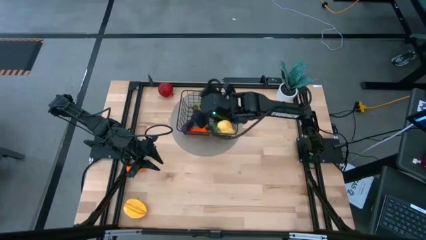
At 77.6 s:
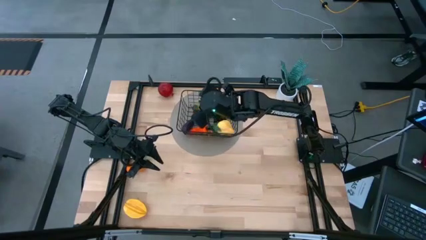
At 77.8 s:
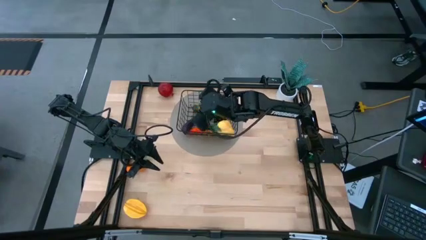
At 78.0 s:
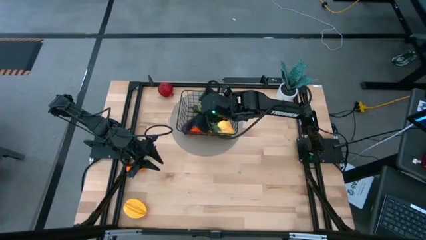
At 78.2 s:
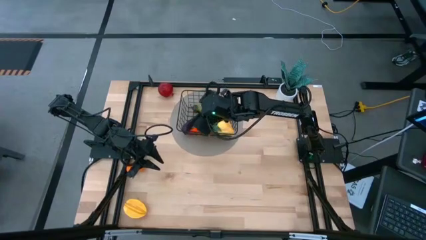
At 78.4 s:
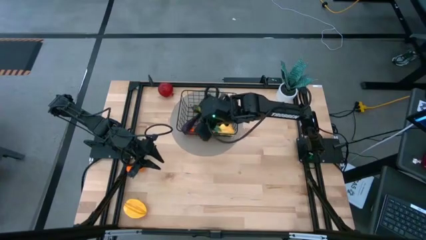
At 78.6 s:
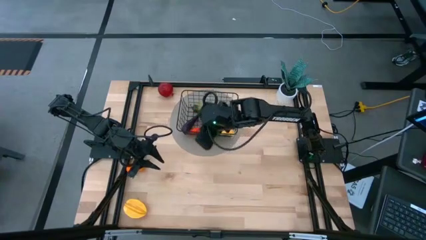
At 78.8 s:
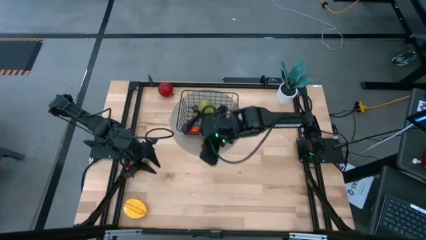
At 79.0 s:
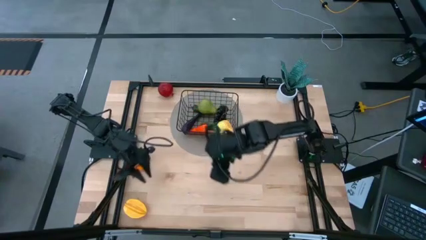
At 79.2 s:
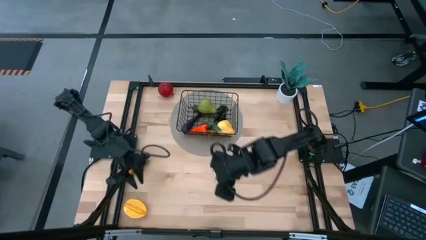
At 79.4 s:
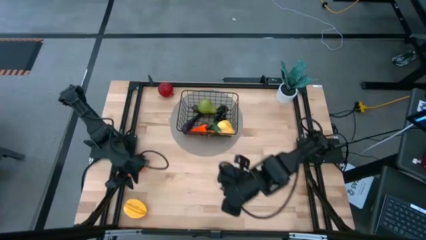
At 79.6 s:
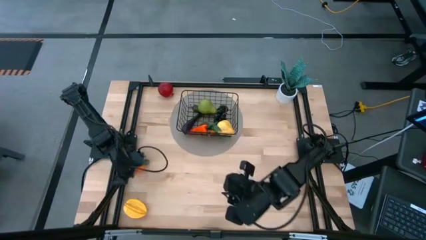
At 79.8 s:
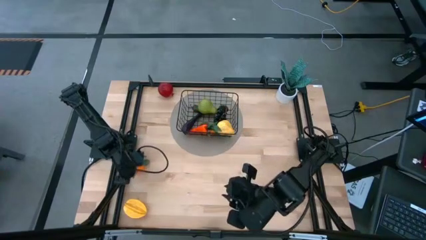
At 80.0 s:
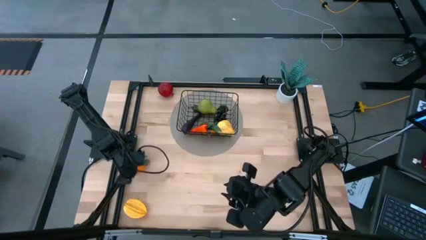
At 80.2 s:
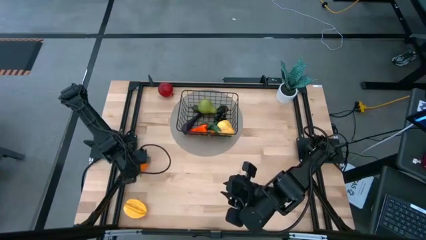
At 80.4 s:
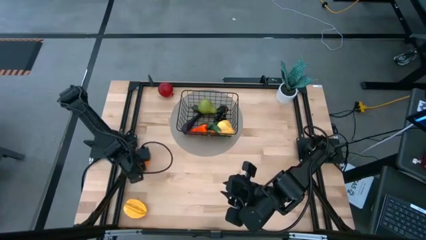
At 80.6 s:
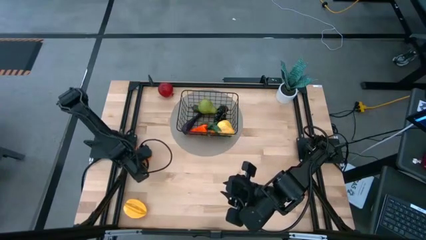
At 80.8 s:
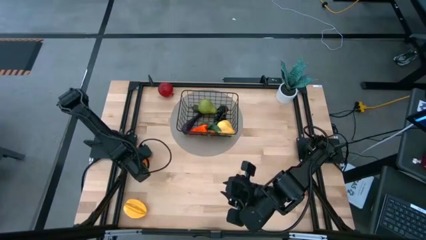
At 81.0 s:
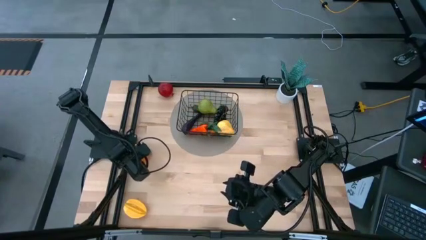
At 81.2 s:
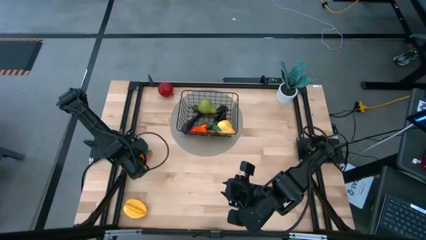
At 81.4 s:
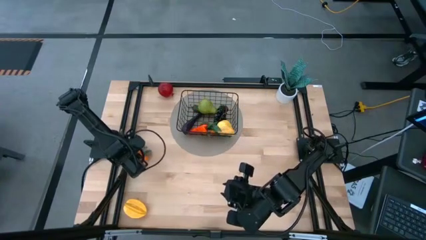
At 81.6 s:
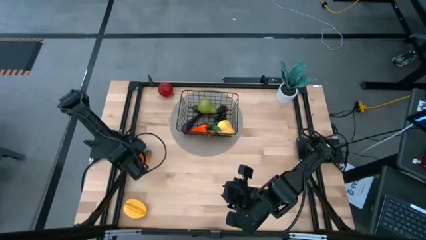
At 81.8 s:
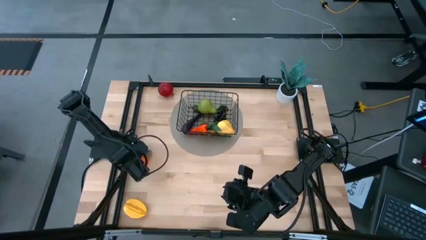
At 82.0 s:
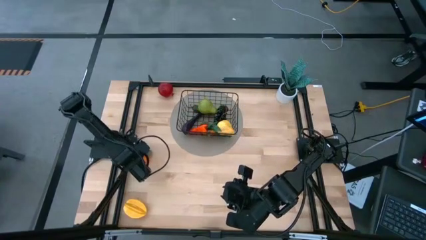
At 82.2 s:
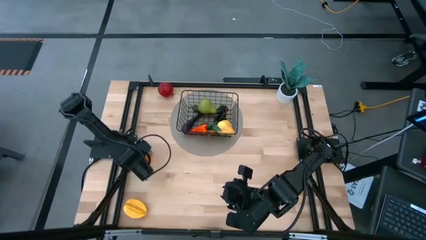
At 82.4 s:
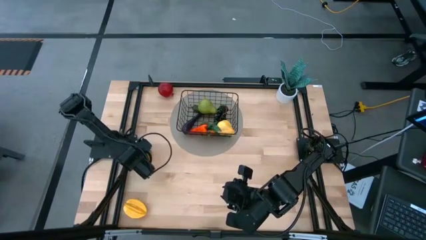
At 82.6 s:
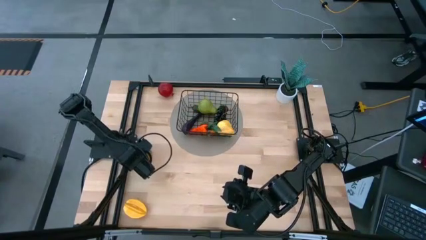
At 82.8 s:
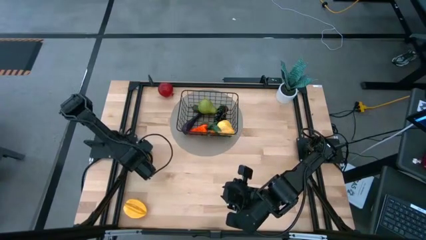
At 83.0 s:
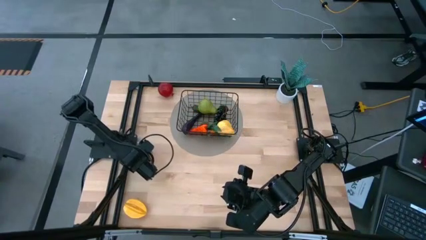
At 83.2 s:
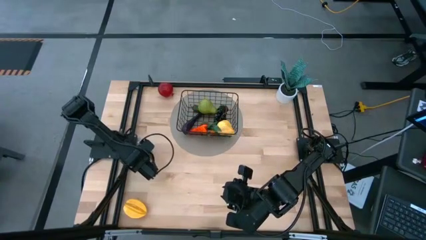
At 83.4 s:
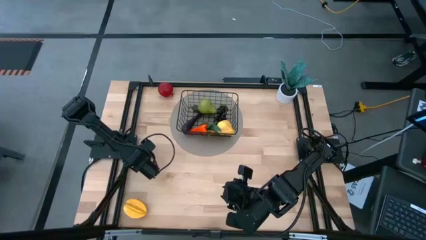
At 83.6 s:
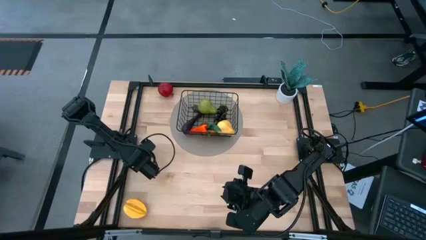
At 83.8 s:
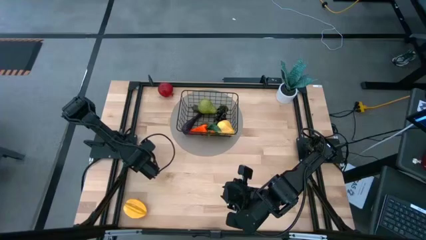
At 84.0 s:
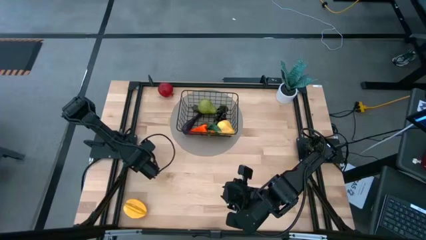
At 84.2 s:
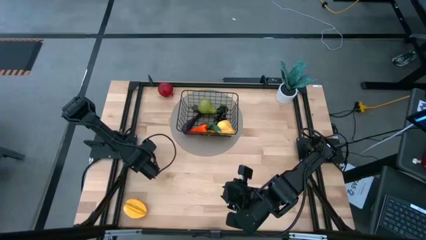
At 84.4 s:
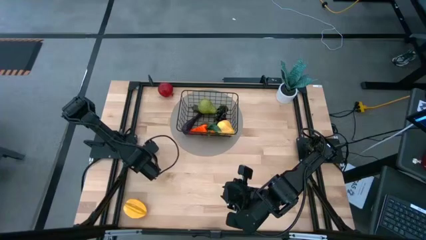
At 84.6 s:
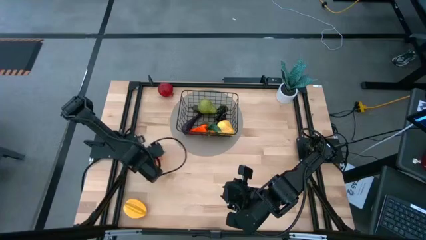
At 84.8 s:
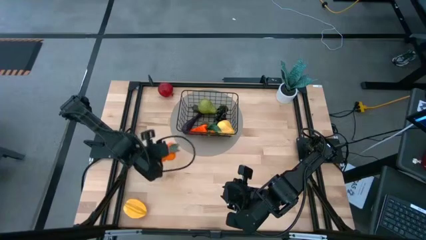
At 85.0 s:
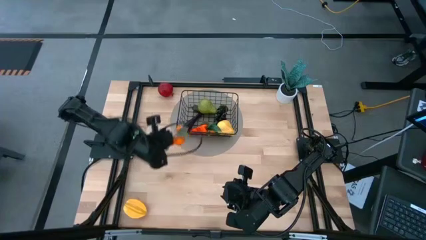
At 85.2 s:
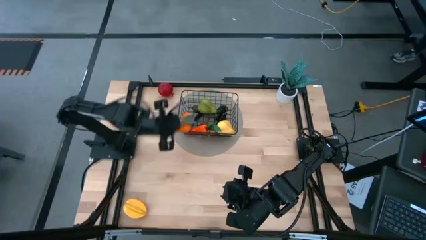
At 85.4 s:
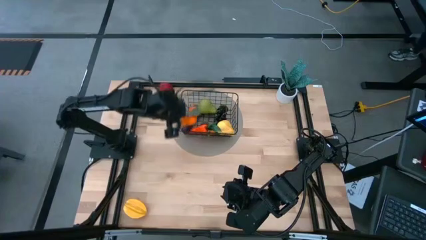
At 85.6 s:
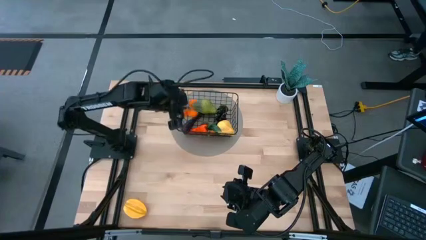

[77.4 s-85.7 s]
Task: Build produce basket
Put the orange tangerines into the black wire basket

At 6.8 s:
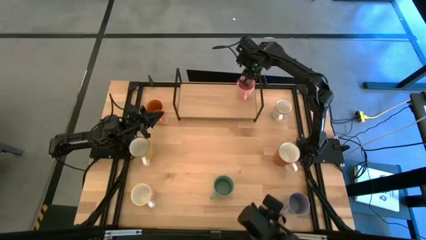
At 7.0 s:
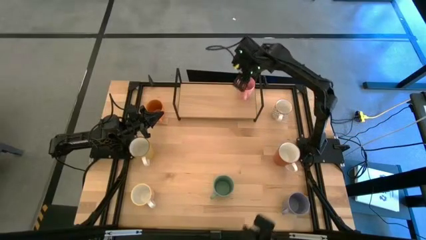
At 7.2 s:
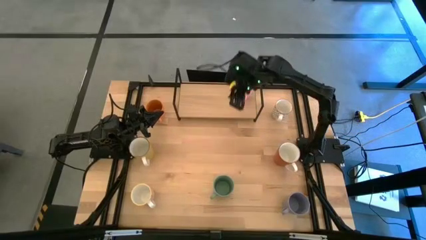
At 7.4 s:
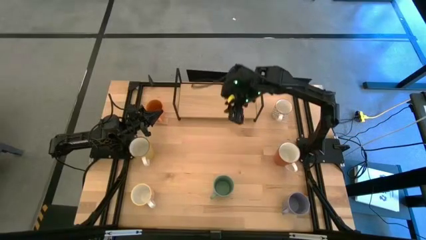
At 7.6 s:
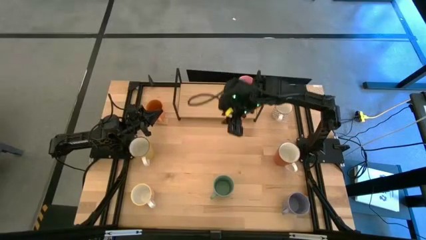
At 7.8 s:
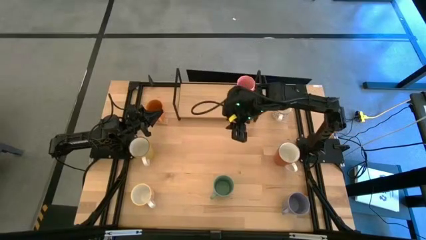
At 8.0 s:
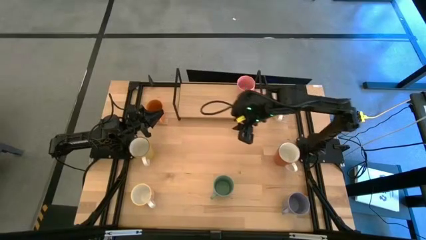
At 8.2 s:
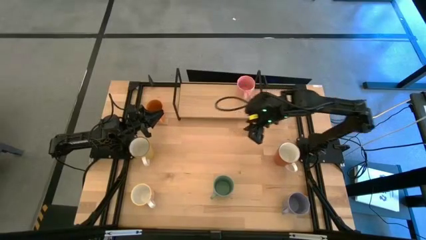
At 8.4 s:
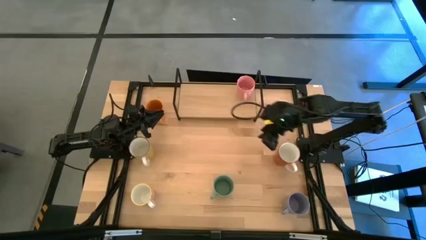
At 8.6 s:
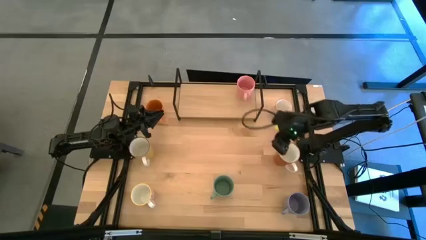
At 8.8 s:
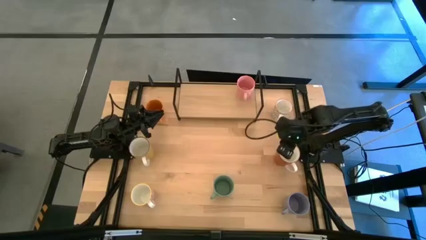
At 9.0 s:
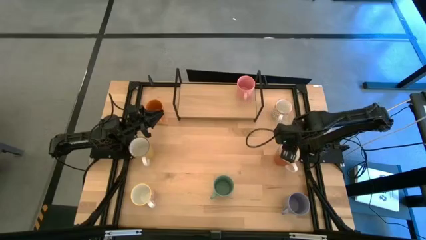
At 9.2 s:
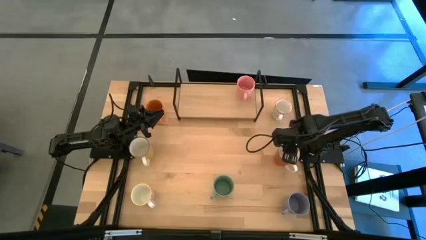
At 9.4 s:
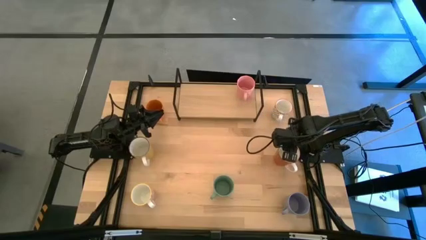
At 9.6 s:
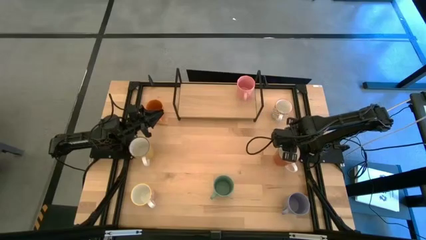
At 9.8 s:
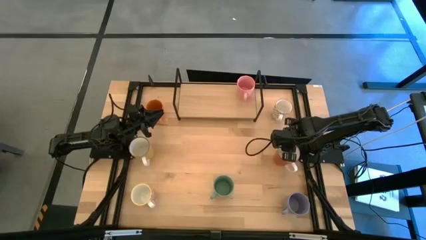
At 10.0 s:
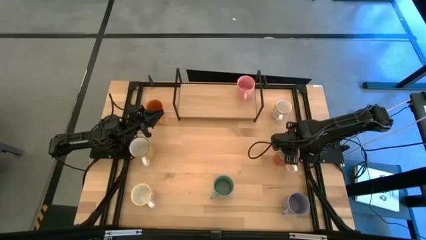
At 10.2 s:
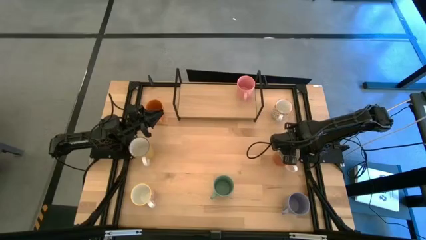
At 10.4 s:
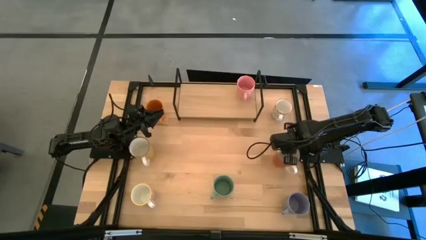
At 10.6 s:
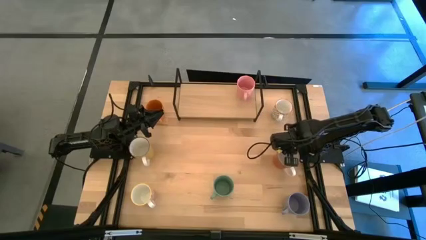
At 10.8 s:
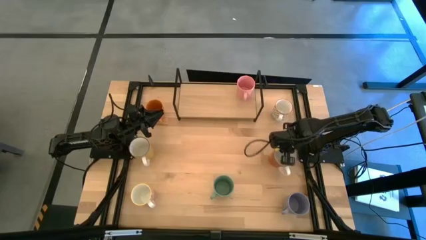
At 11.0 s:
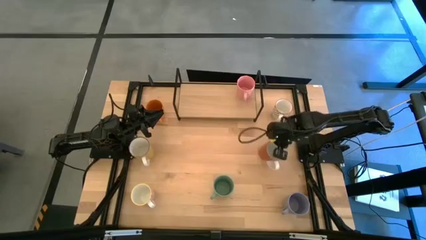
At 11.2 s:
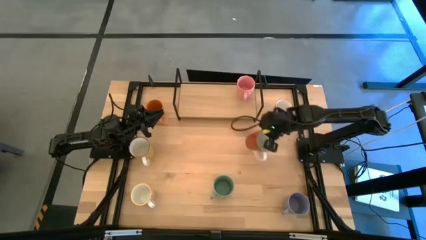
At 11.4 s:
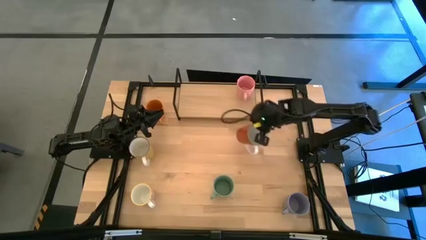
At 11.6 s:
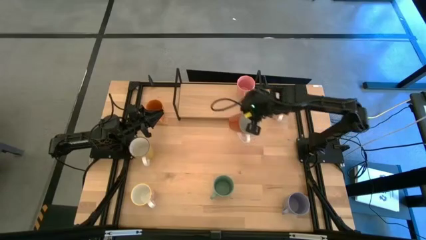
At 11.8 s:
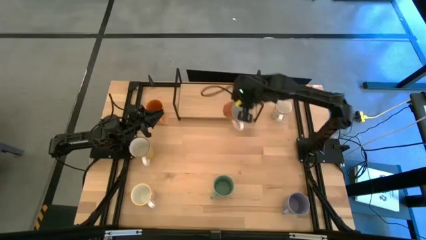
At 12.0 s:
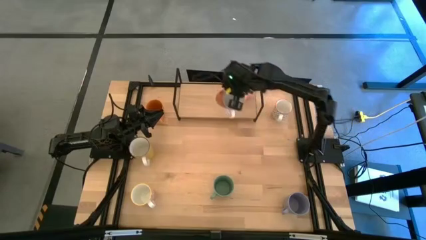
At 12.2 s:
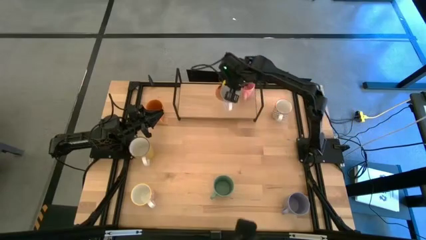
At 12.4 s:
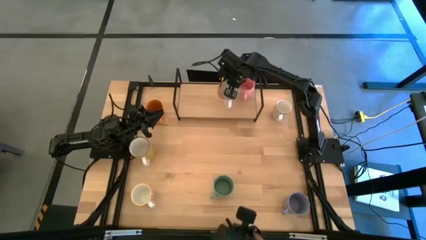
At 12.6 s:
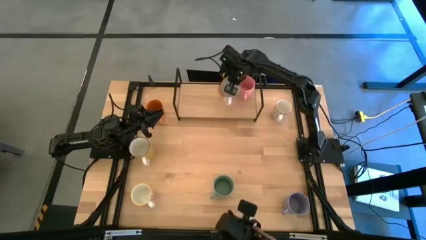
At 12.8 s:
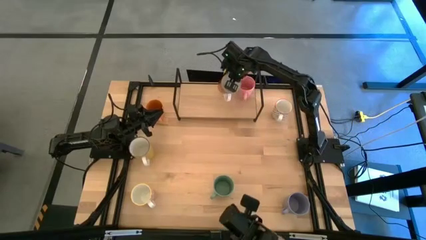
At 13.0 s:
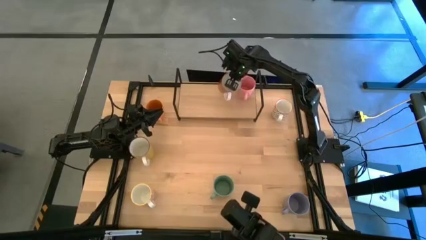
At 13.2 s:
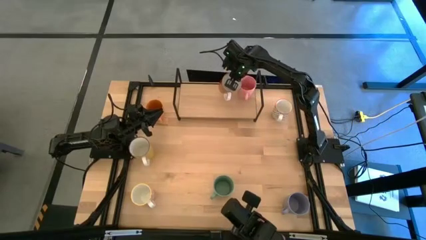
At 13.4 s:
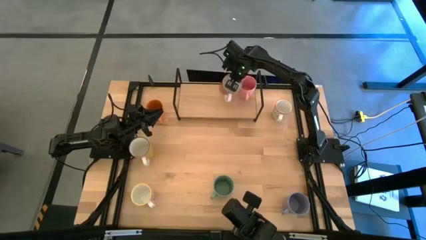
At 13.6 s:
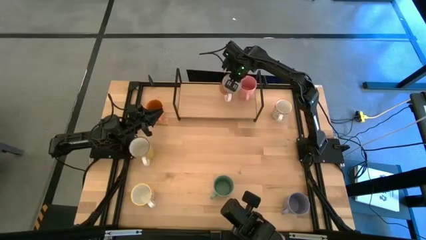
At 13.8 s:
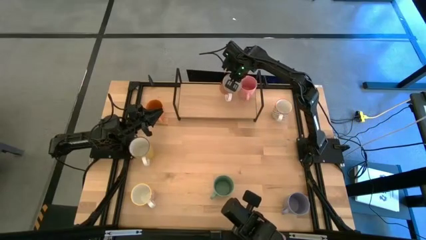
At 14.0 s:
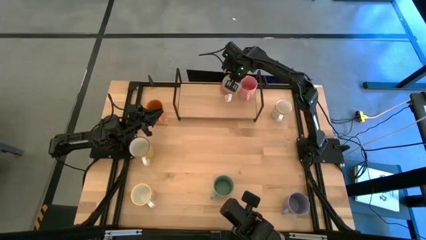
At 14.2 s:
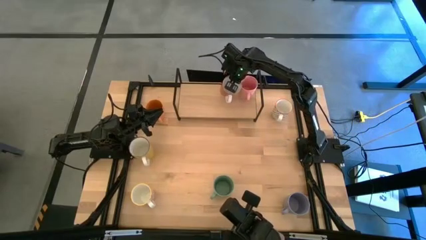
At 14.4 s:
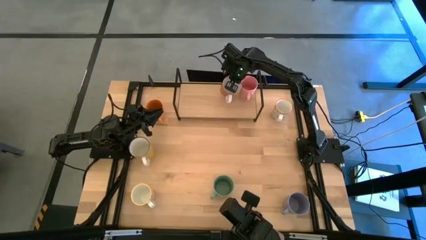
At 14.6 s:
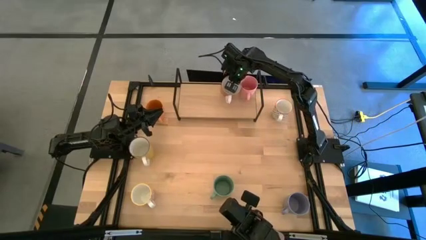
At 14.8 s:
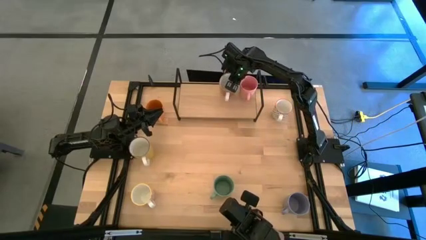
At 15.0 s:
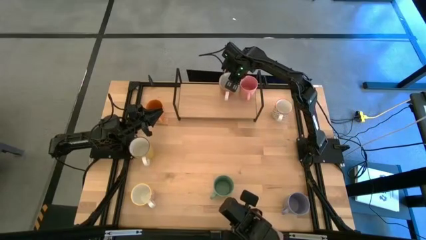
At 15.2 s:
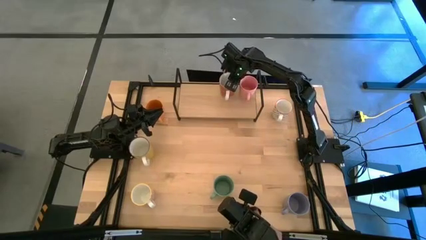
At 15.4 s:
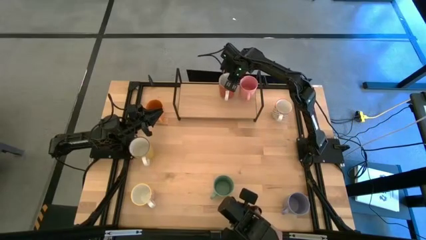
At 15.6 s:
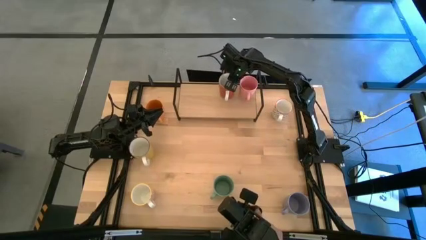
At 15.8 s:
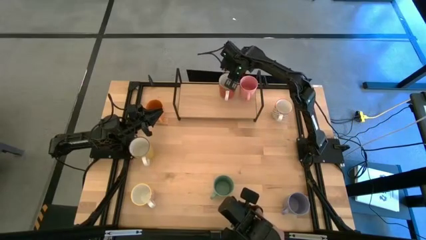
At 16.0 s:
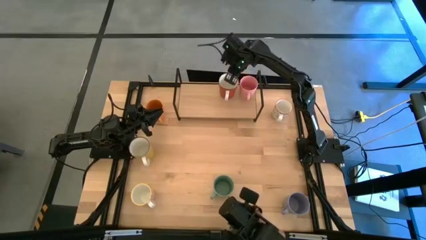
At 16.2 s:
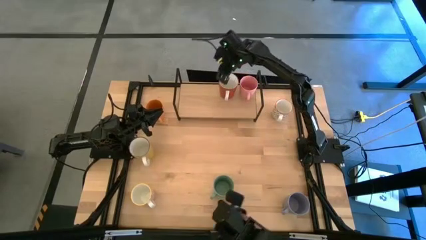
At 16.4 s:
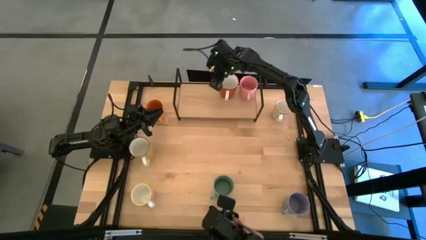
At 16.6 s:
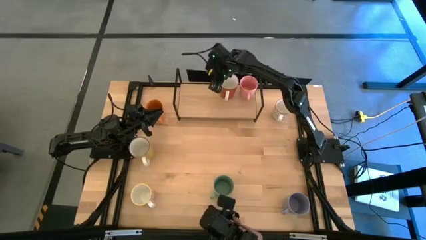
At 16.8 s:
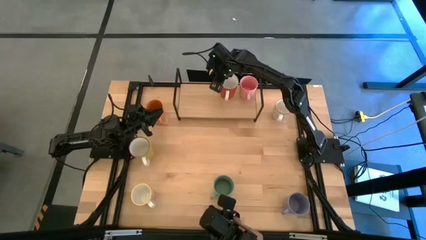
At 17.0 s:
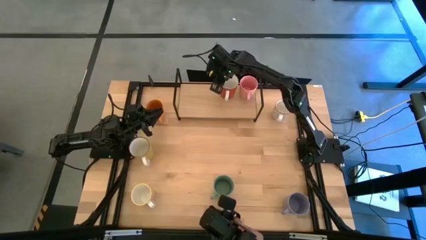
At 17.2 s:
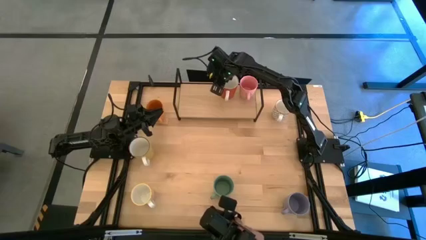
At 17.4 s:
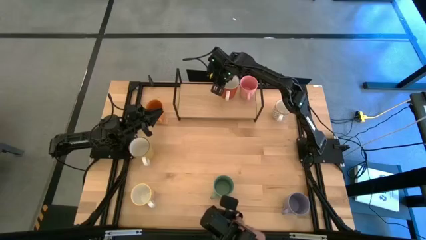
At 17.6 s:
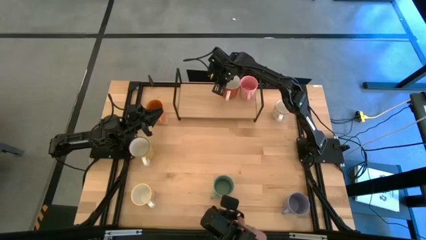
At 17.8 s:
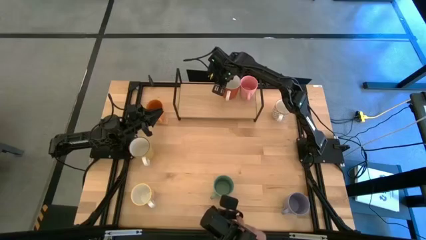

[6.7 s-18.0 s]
Task: Place coffee mugs
Put the red mug on the shelf
